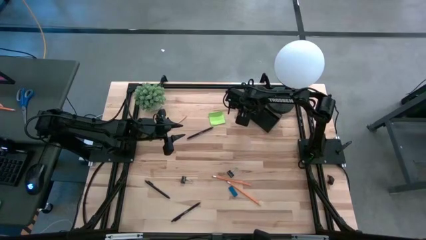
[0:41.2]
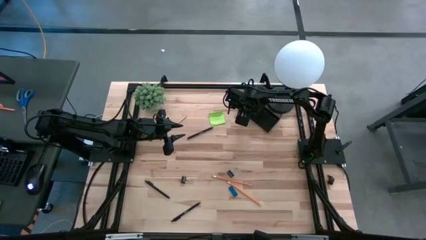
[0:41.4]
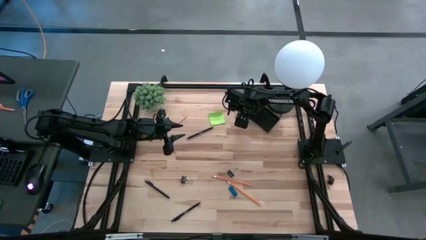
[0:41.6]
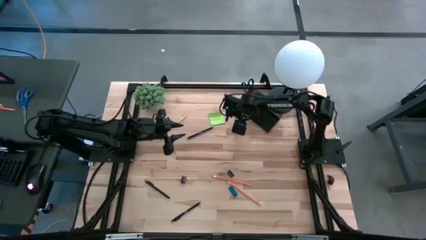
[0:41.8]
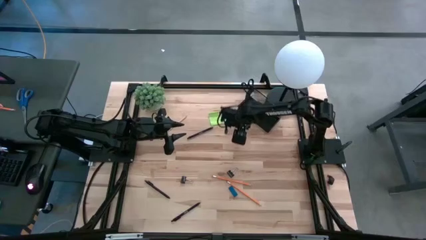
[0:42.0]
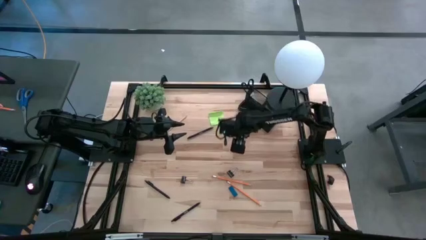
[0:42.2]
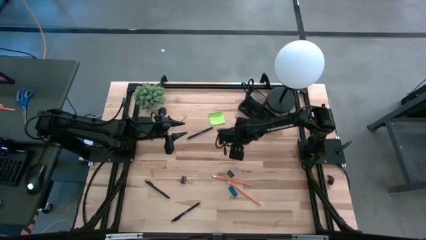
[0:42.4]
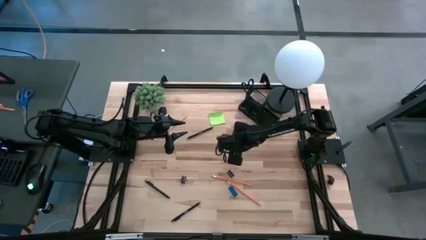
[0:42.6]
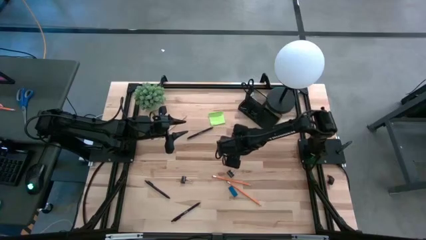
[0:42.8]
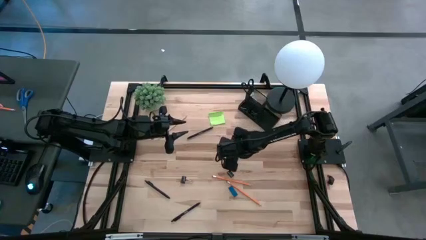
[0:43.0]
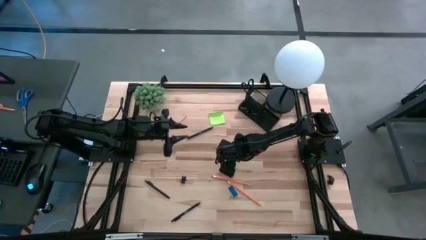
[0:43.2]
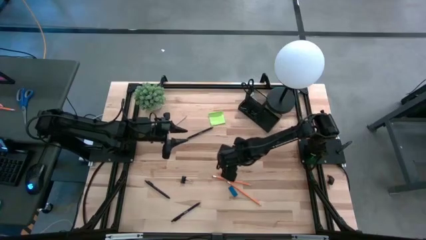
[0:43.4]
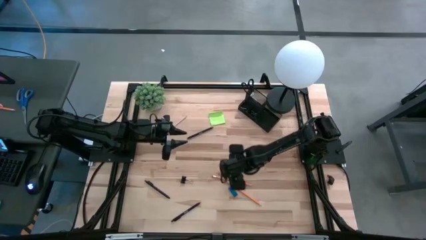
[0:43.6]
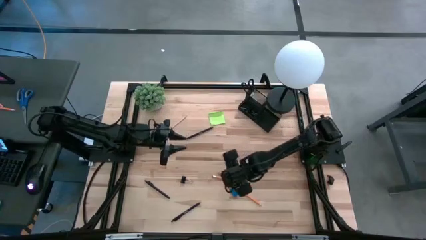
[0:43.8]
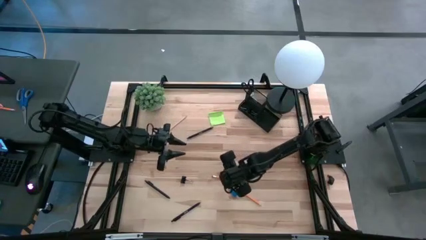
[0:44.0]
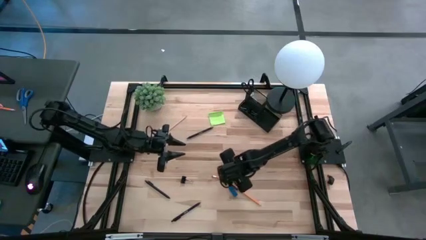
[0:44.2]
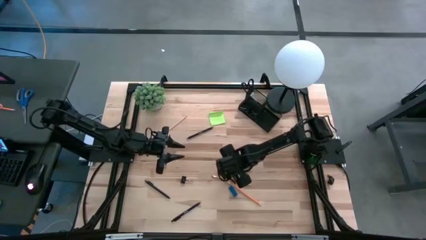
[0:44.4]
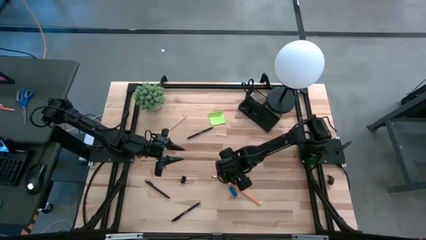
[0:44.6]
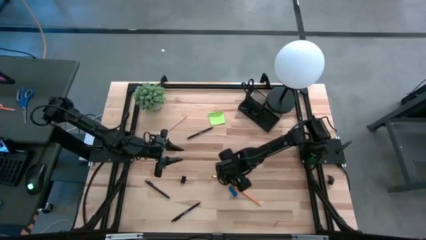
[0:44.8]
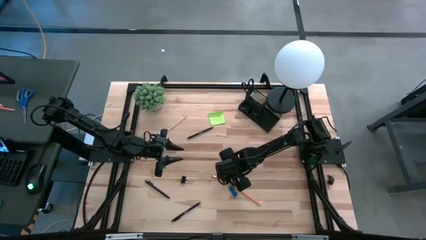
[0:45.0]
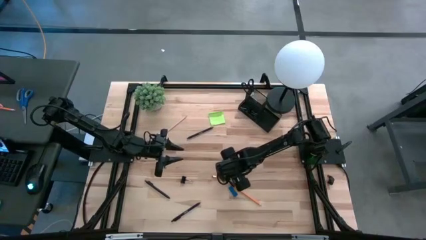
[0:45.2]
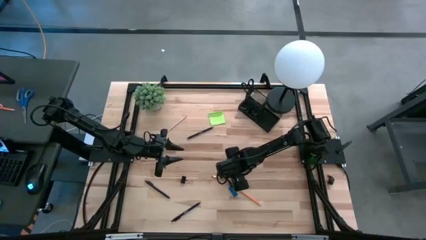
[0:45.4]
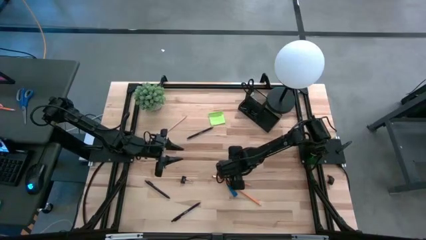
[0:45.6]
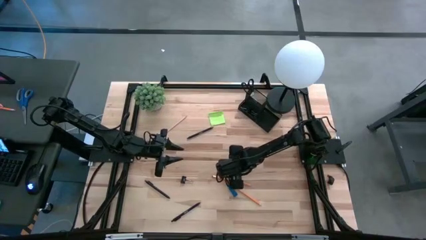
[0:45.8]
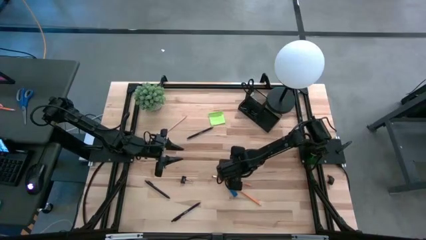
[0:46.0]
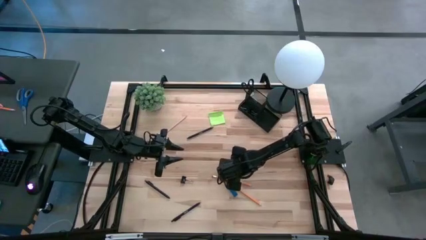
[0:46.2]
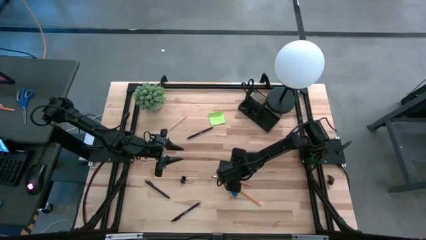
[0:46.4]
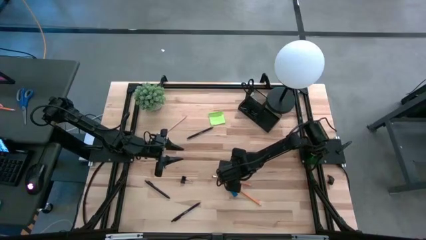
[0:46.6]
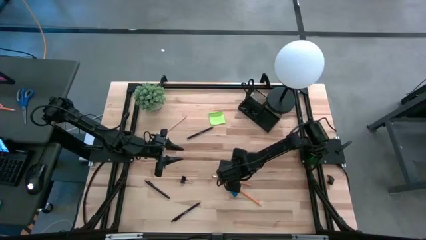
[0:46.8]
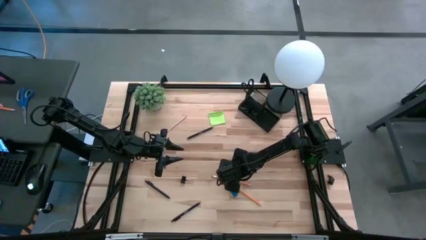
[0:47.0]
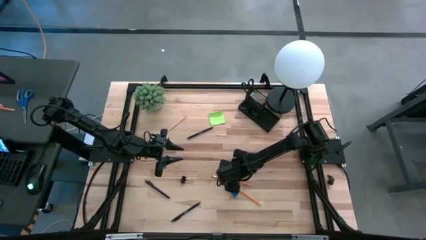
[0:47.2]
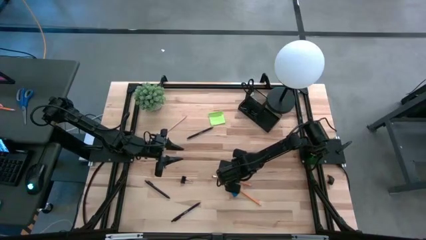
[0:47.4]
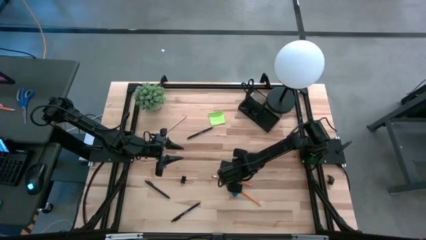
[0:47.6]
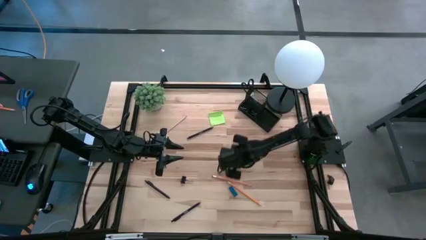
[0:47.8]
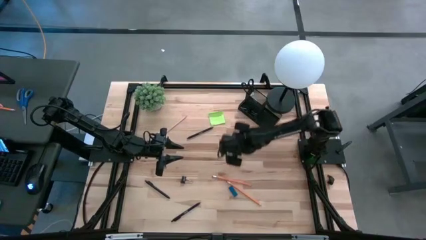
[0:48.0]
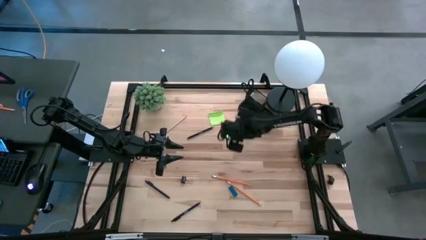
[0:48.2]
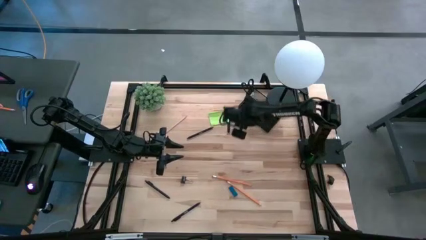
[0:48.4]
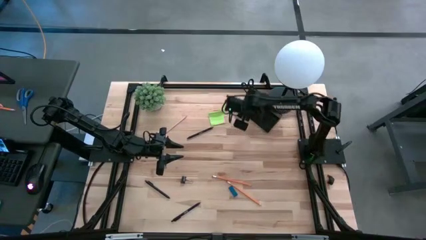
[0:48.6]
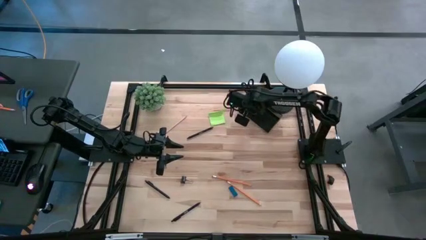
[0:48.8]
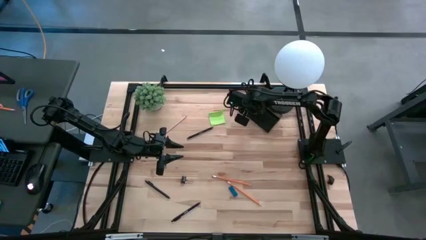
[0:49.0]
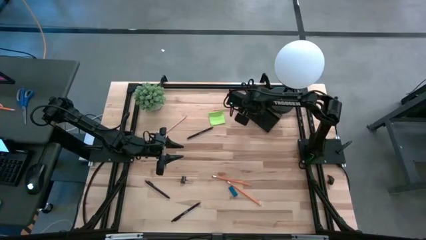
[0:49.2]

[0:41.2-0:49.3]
Task: Pick and place office supplies into organizer
Put the black binder clip into the black desk organizer

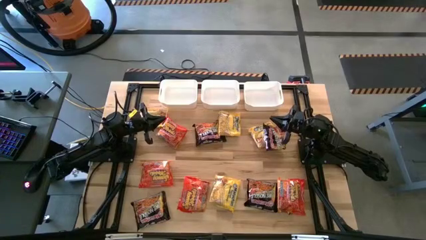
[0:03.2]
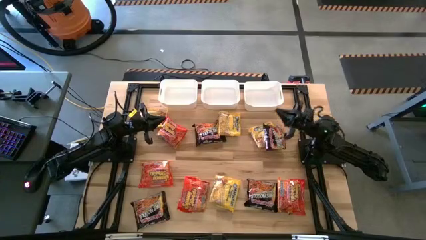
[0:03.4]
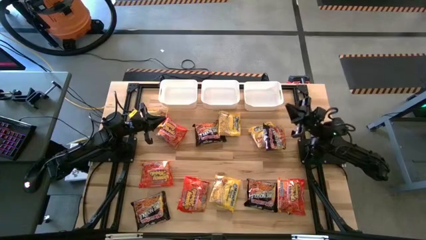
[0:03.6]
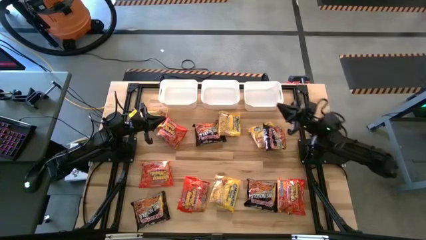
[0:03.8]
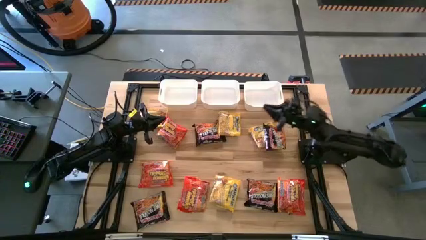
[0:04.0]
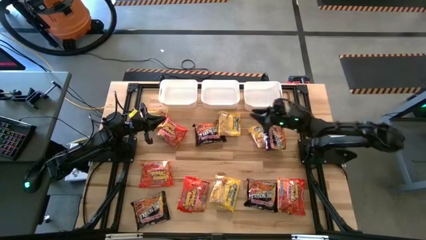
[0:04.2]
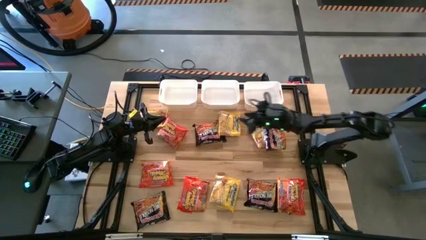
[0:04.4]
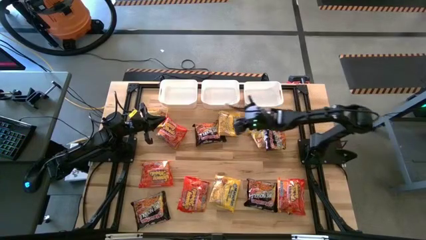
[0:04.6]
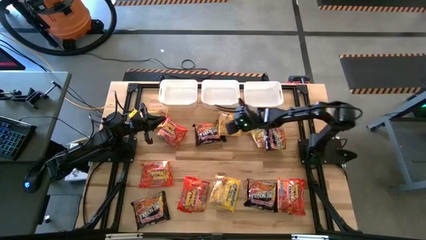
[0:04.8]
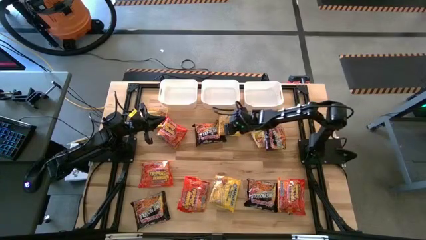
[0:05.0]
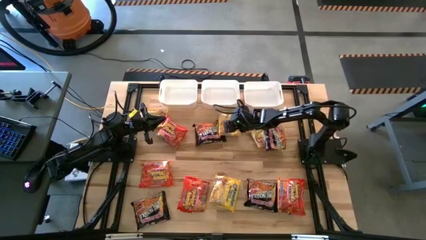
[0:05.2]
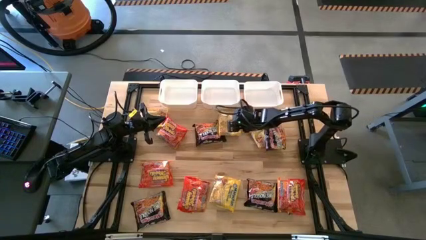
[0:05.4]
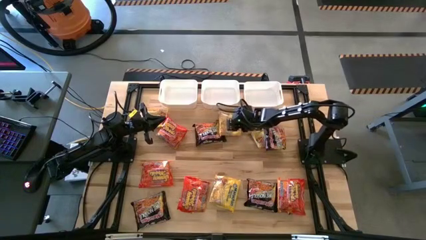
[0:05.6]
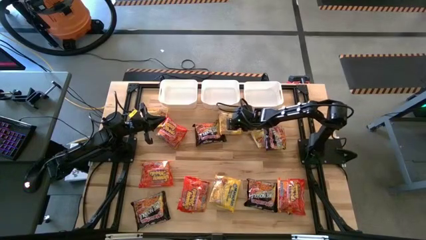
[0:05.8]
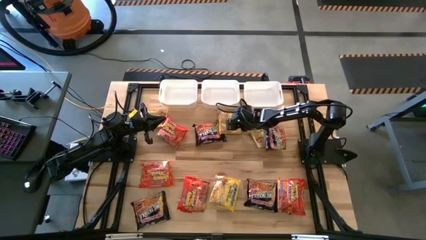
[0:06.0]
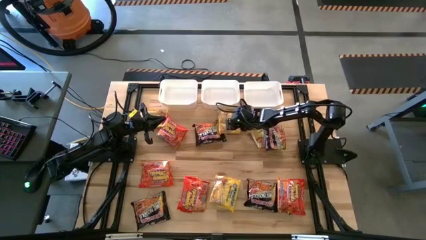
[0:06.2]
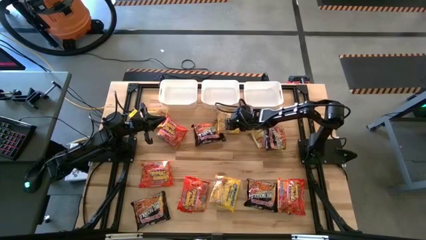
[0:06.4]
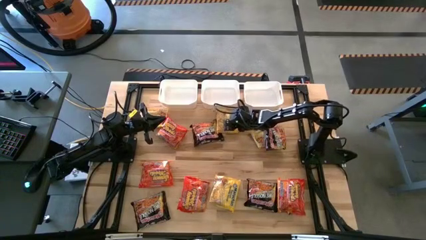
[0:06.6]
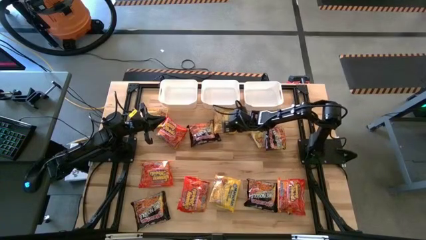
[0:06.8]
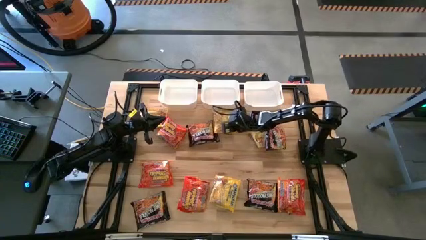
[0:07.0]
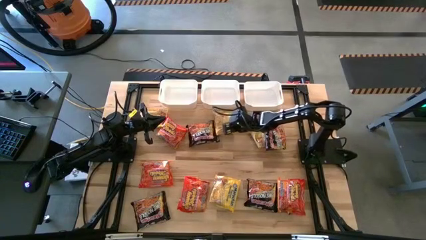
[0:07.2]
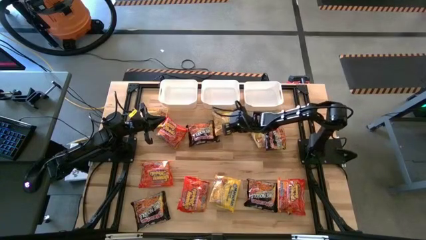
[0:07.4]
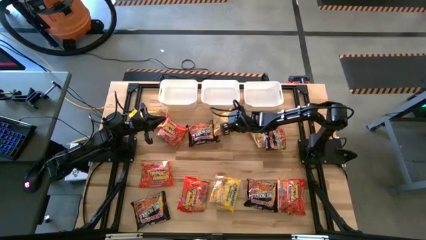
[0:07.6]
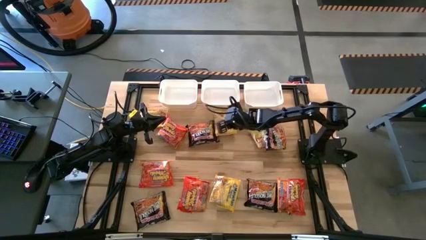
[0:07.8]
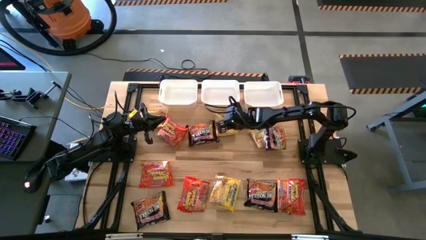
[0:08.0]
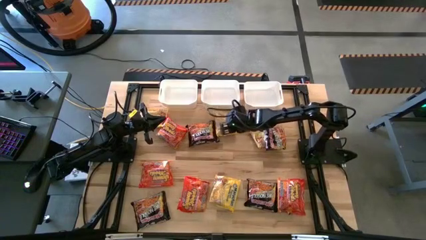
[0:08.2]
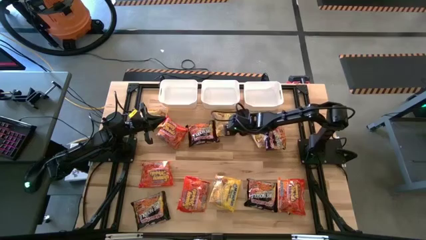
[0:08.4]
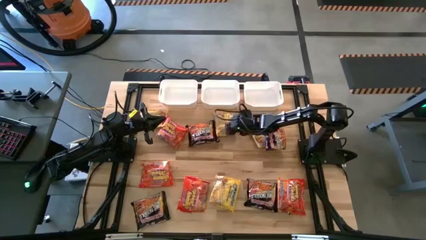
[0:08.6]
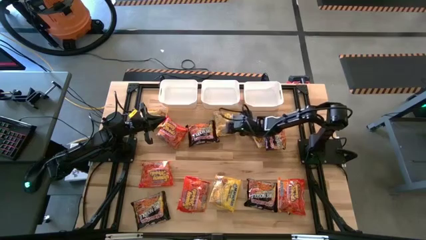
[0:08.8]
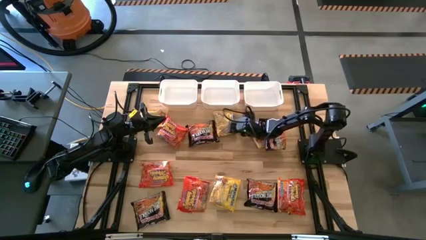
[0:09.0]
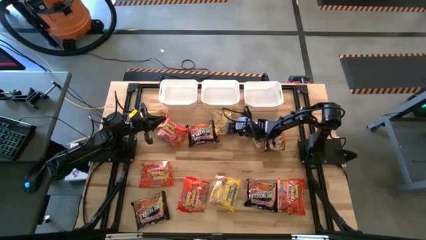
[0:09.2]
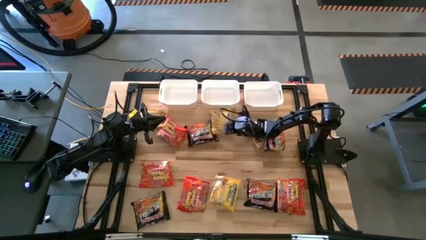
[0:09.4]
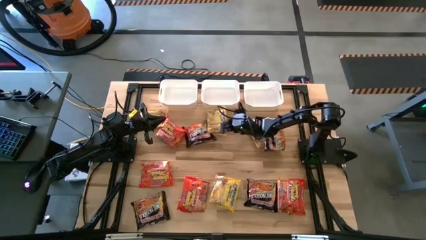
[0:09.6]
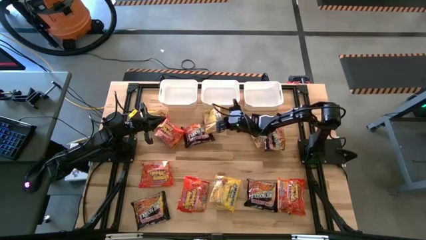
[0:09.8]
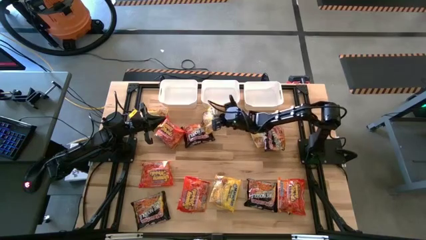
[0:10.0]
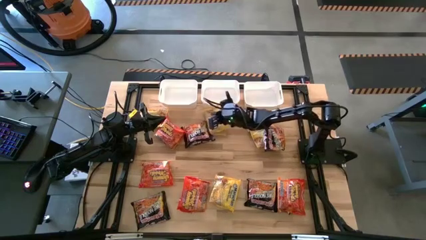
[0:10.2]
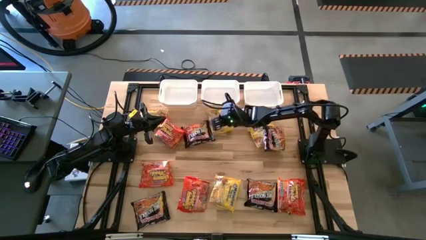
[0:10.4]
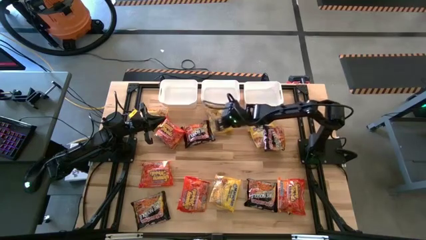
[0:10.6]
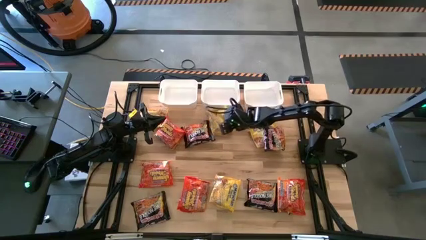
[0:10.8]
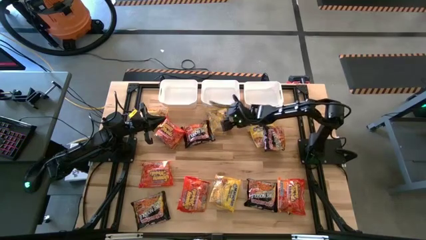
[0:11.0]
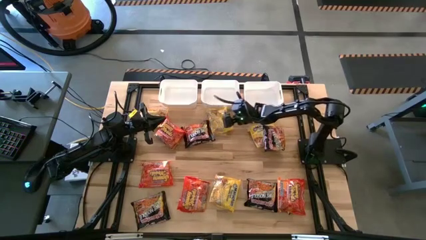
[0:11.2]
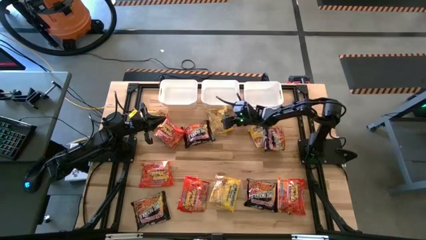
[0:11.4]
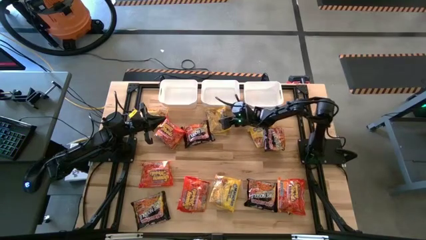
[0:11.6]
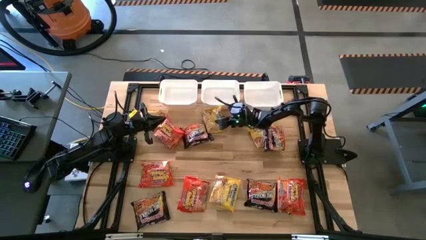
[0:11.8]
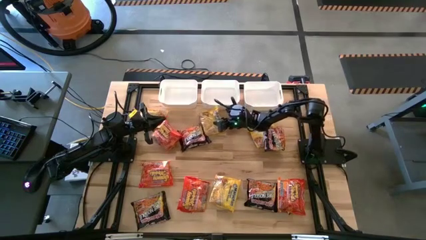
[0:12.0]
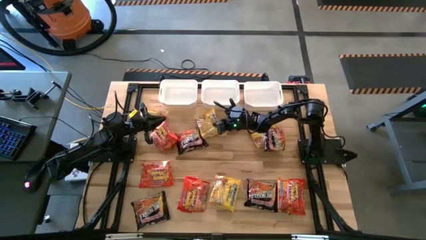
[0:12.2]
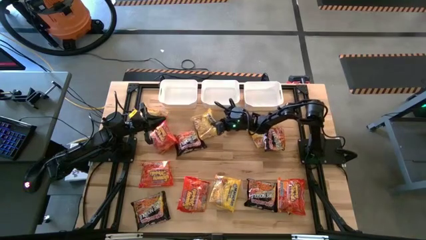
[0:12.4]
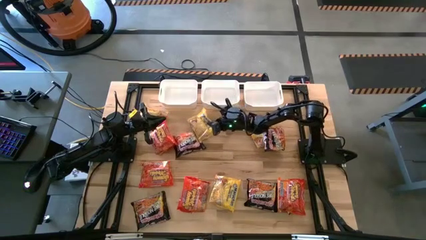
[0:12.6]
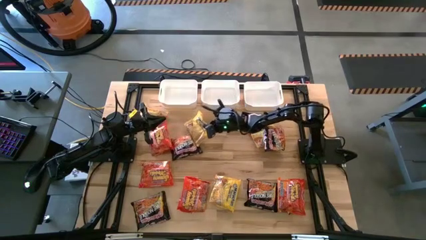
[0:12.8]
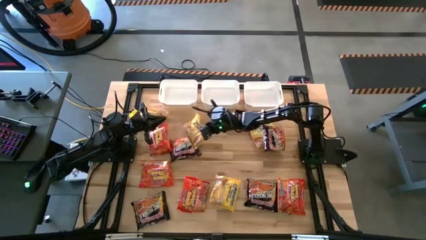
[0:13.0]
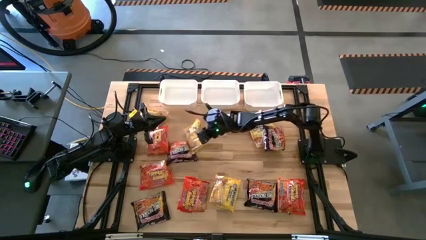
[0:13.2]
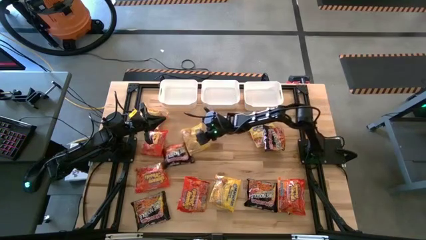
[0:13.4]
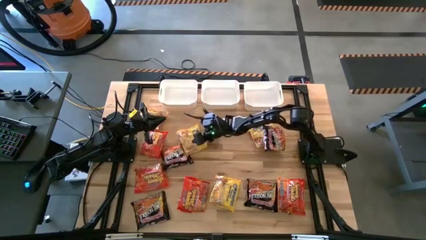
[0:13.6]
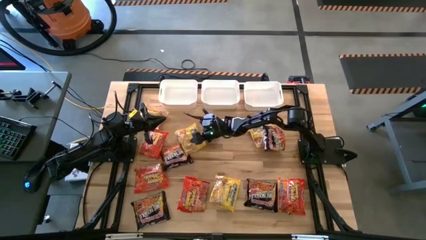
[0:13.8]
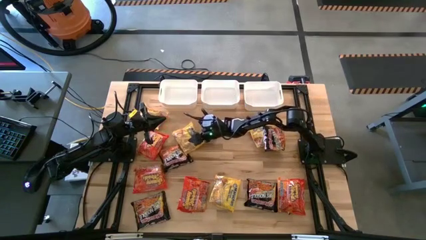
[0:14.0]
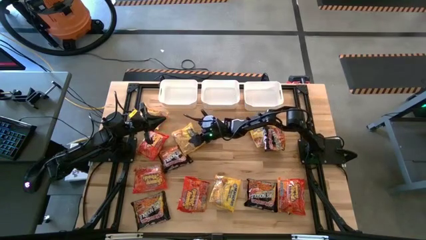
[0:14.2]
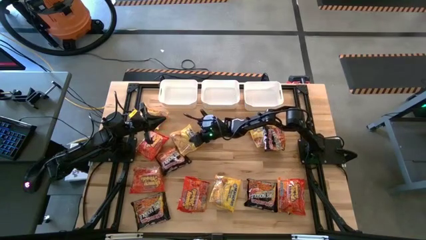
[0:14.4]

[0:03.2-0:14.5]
Task: Sort Maruchan noodles
Put the yellow noodle into the center white bin
